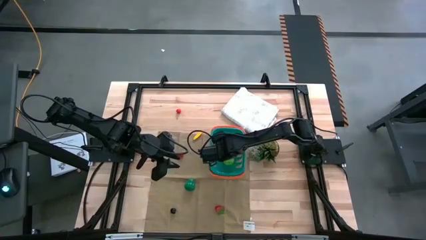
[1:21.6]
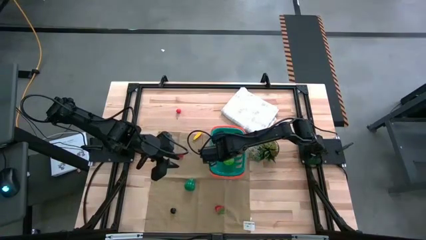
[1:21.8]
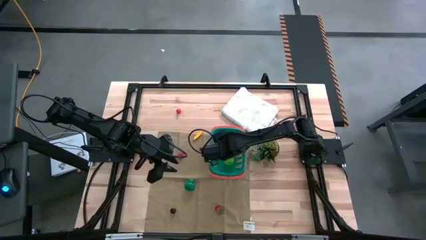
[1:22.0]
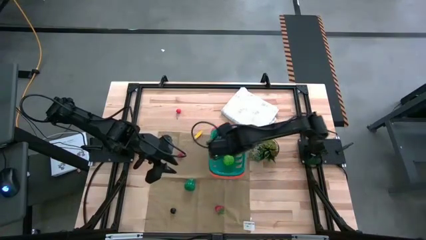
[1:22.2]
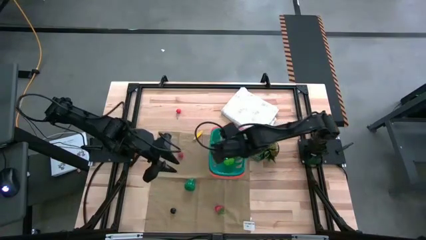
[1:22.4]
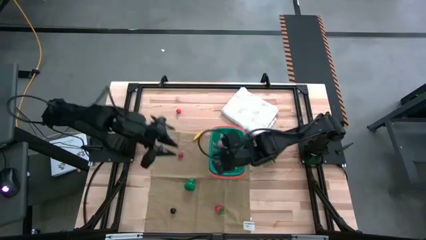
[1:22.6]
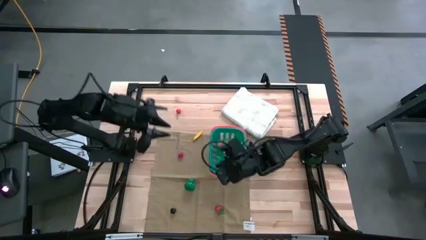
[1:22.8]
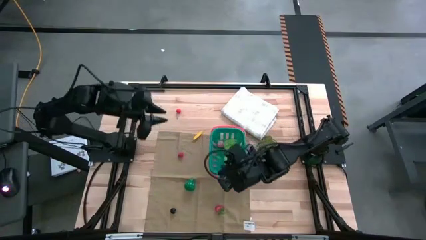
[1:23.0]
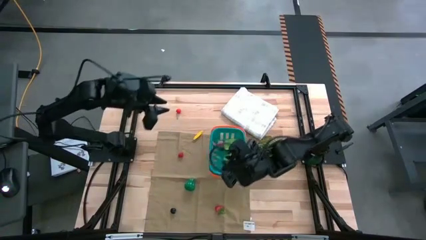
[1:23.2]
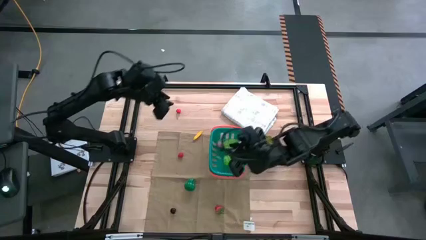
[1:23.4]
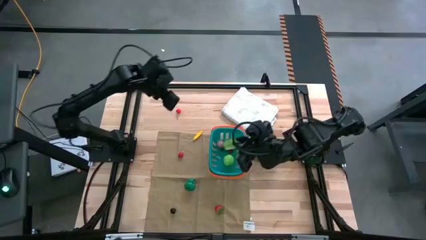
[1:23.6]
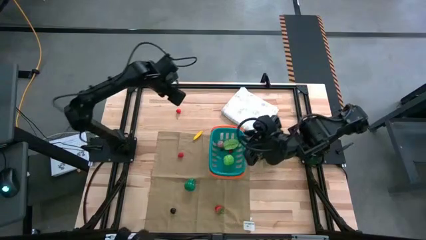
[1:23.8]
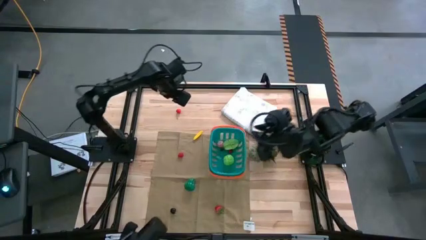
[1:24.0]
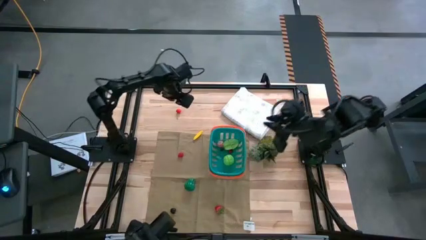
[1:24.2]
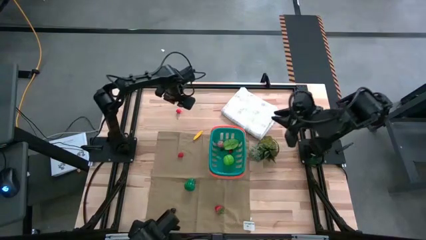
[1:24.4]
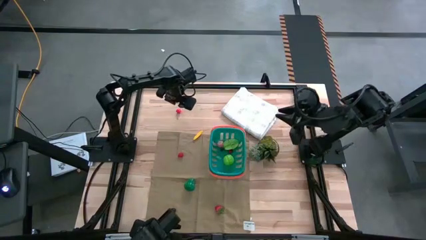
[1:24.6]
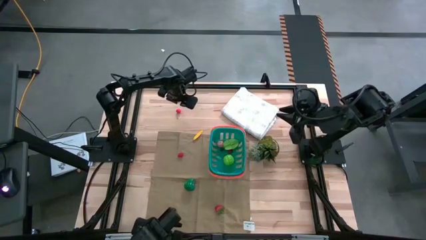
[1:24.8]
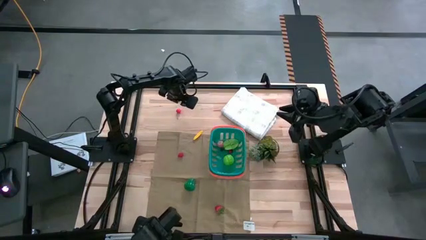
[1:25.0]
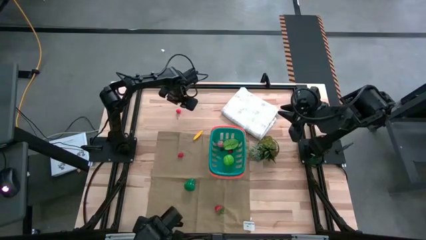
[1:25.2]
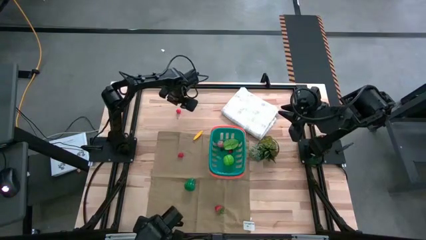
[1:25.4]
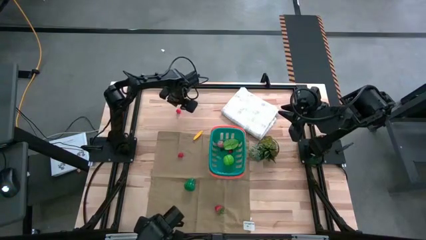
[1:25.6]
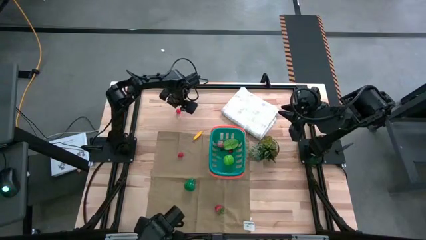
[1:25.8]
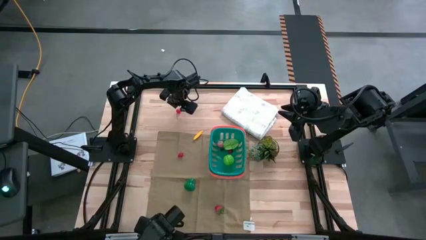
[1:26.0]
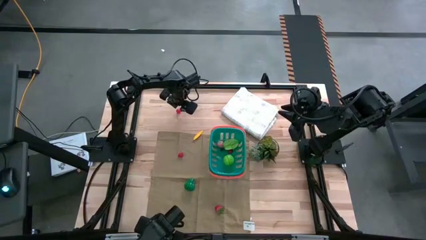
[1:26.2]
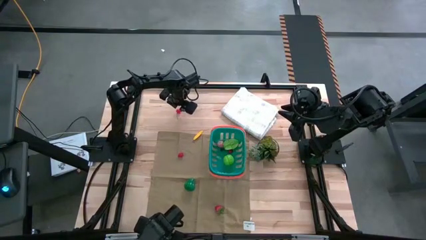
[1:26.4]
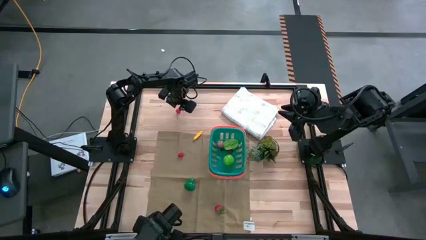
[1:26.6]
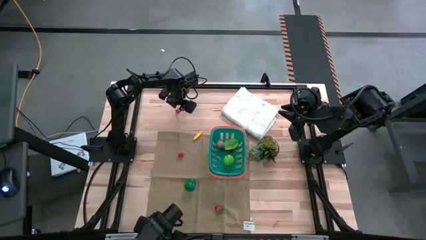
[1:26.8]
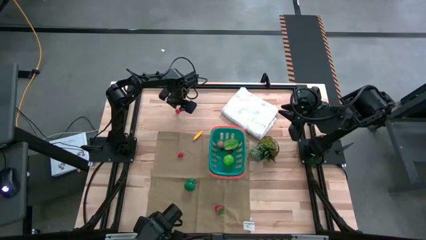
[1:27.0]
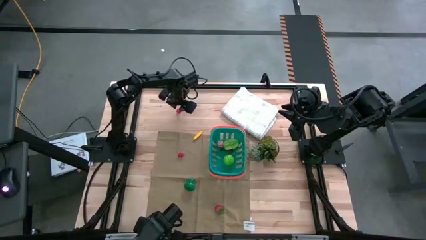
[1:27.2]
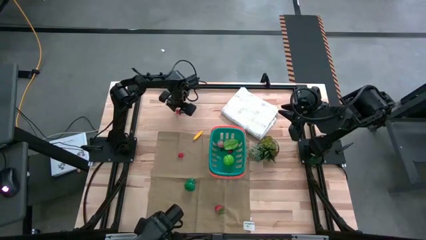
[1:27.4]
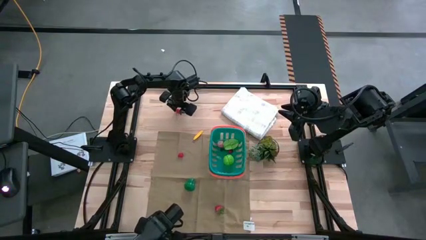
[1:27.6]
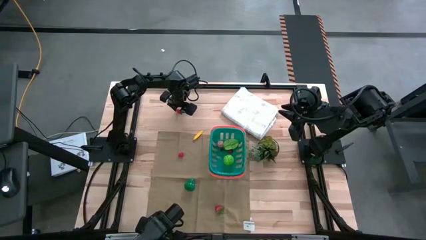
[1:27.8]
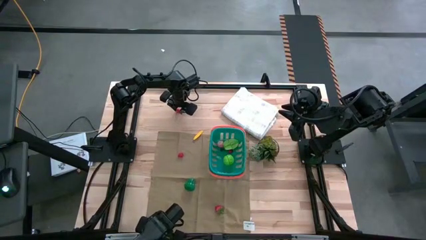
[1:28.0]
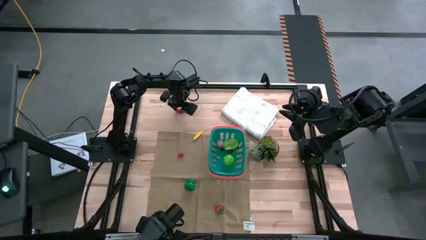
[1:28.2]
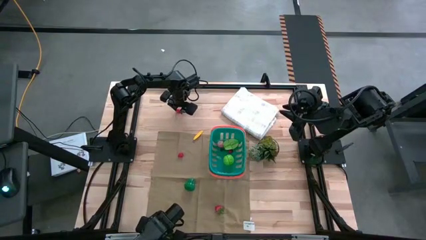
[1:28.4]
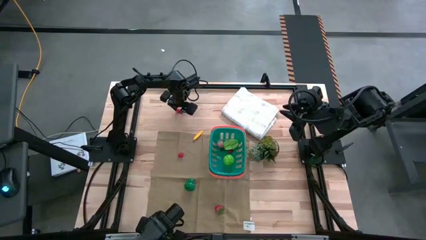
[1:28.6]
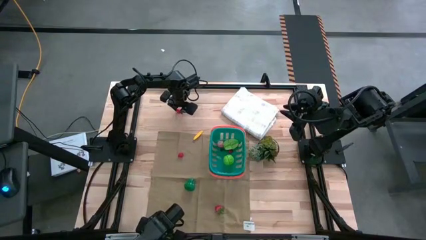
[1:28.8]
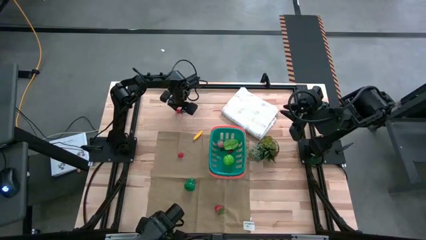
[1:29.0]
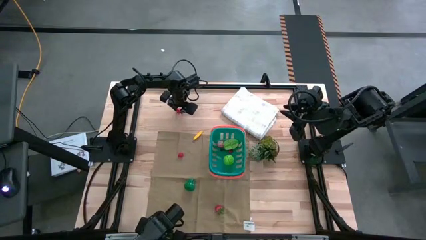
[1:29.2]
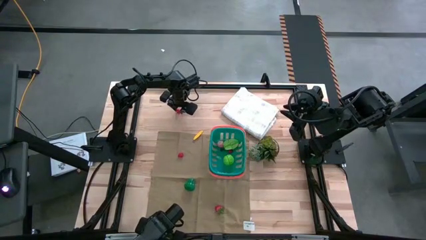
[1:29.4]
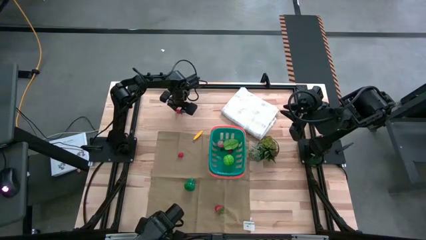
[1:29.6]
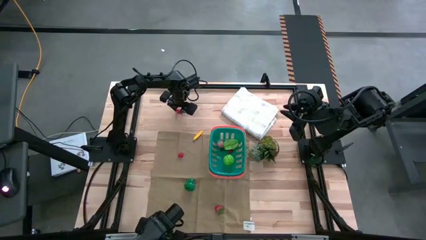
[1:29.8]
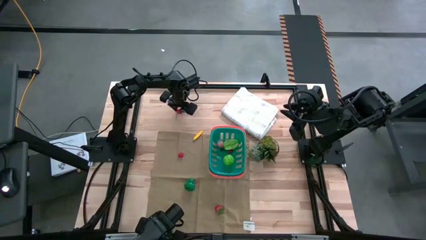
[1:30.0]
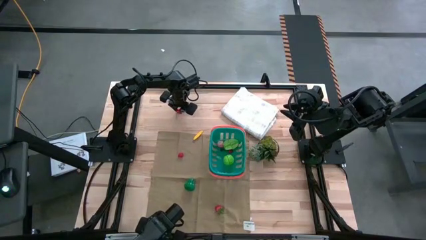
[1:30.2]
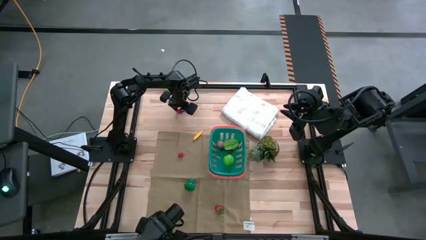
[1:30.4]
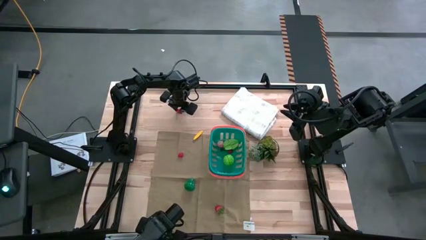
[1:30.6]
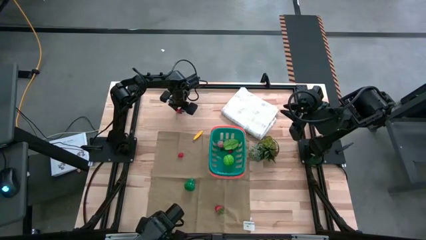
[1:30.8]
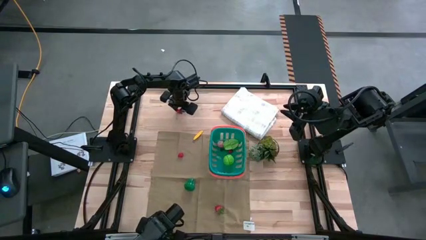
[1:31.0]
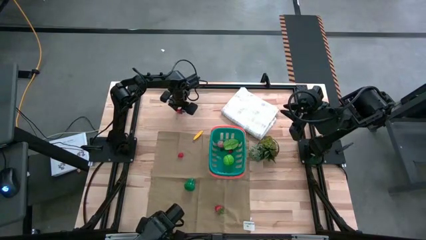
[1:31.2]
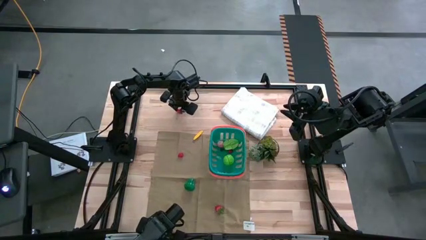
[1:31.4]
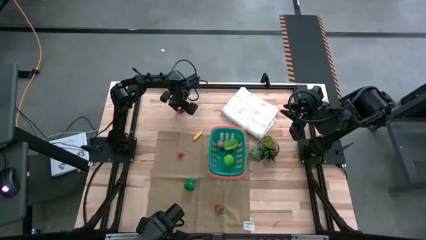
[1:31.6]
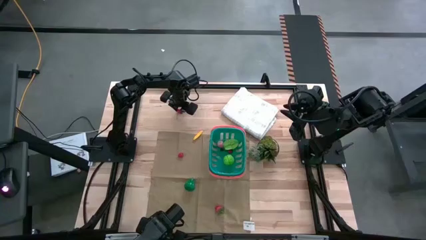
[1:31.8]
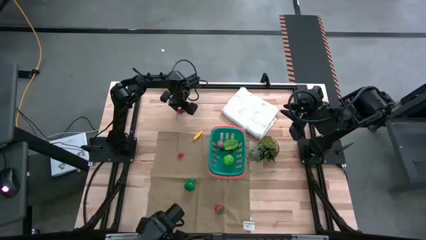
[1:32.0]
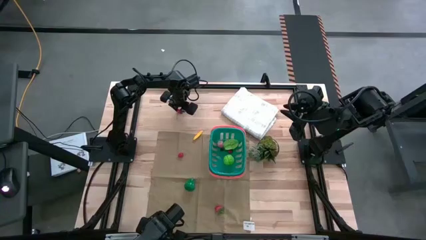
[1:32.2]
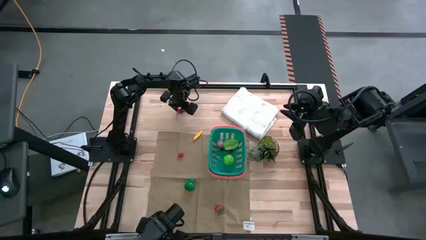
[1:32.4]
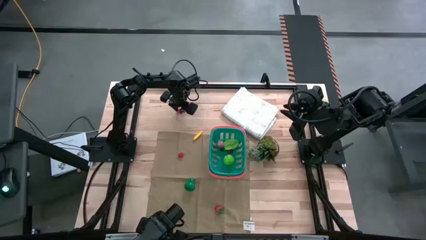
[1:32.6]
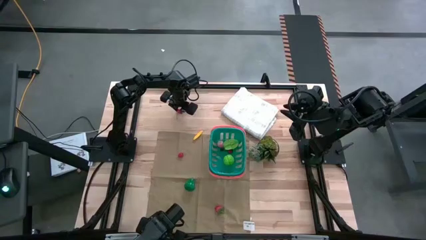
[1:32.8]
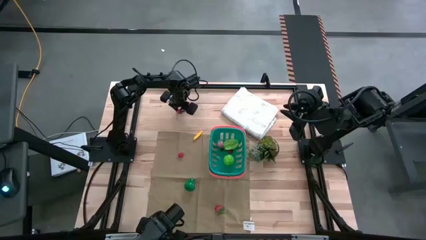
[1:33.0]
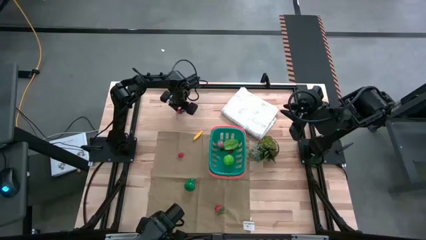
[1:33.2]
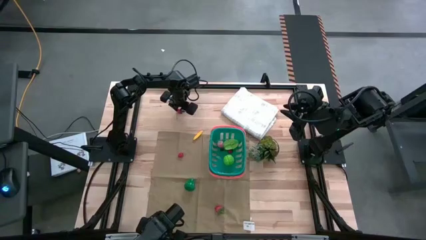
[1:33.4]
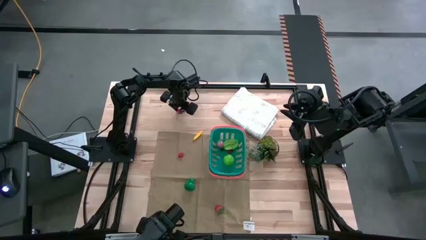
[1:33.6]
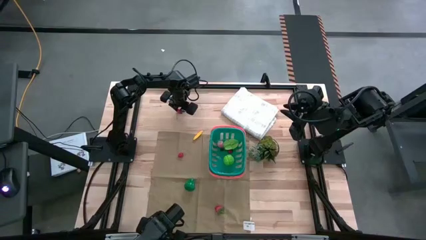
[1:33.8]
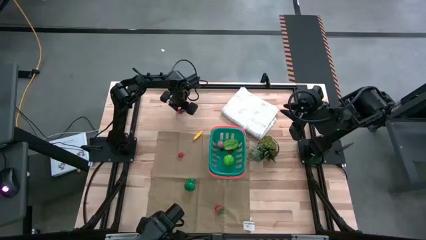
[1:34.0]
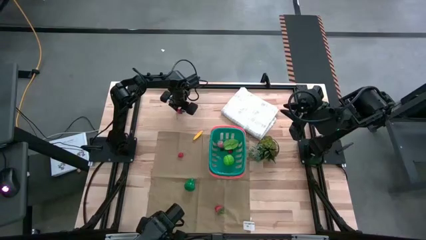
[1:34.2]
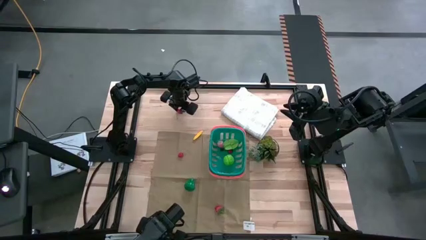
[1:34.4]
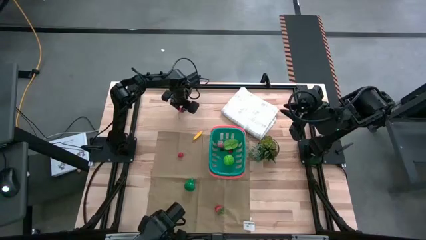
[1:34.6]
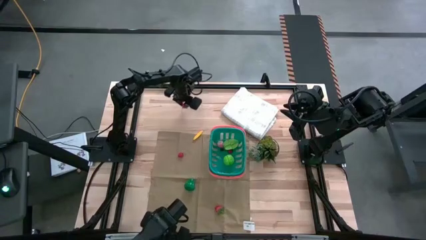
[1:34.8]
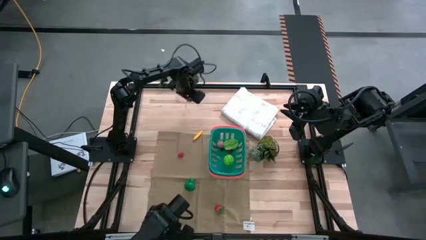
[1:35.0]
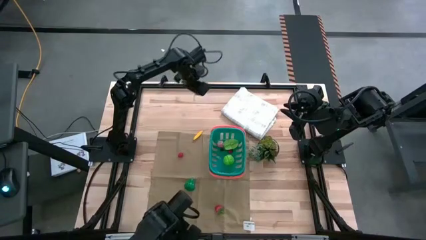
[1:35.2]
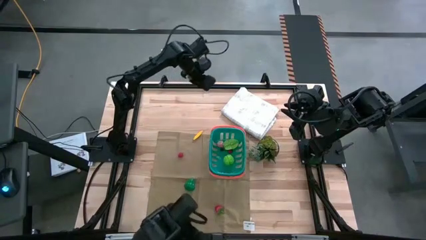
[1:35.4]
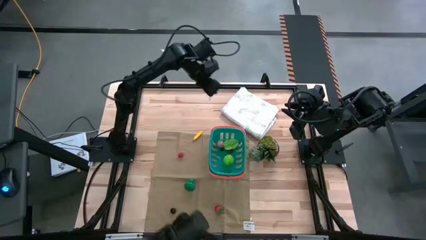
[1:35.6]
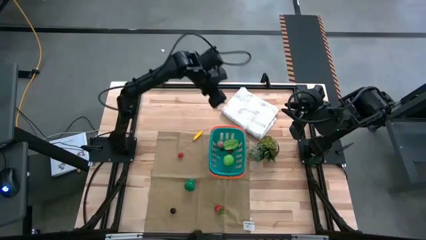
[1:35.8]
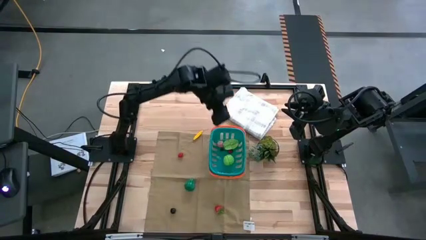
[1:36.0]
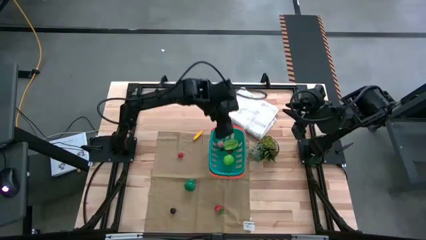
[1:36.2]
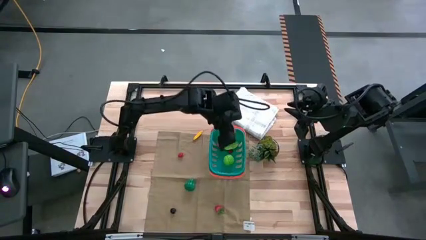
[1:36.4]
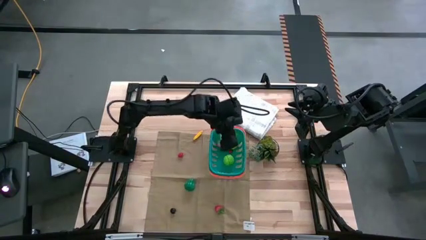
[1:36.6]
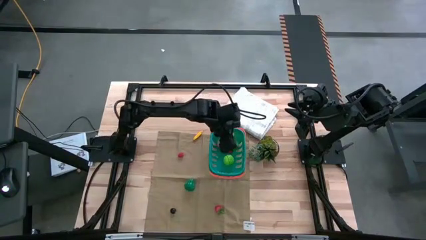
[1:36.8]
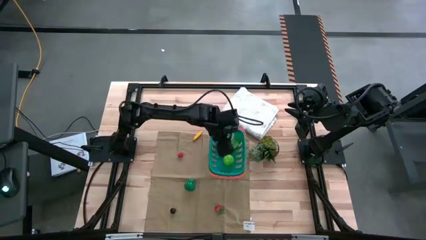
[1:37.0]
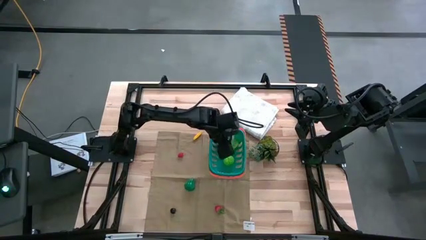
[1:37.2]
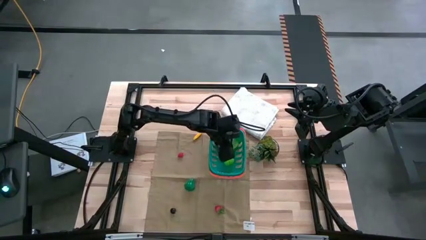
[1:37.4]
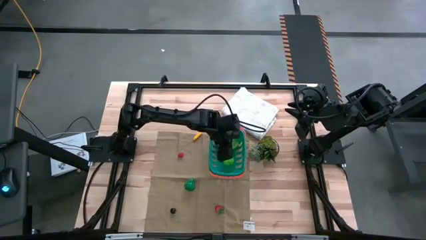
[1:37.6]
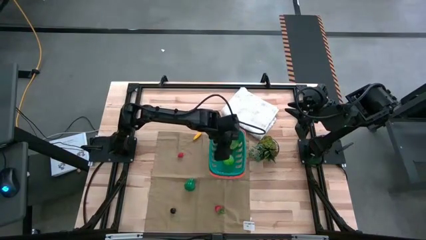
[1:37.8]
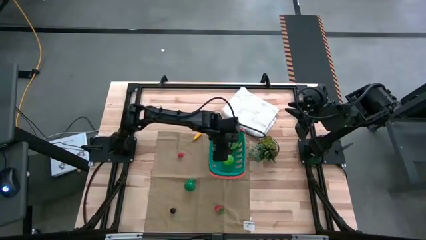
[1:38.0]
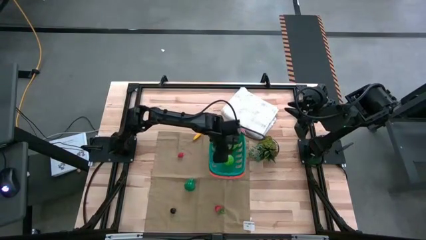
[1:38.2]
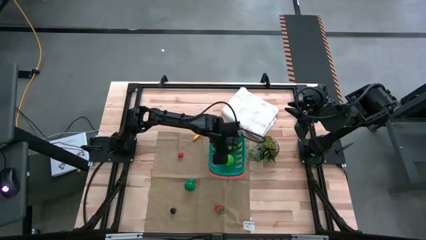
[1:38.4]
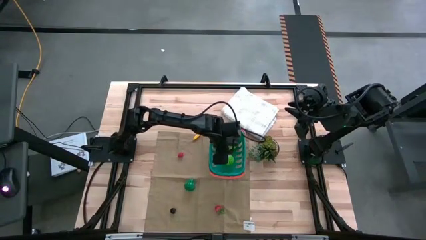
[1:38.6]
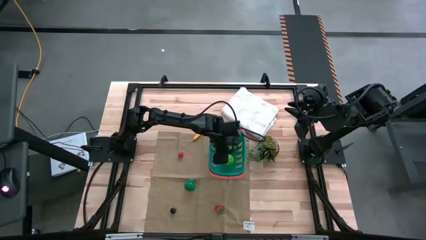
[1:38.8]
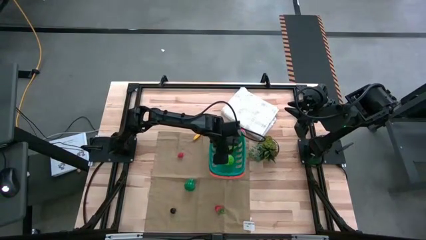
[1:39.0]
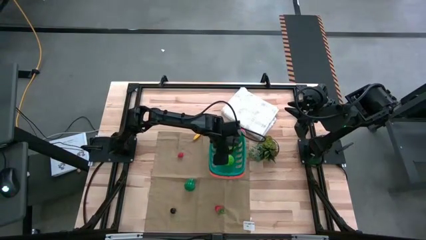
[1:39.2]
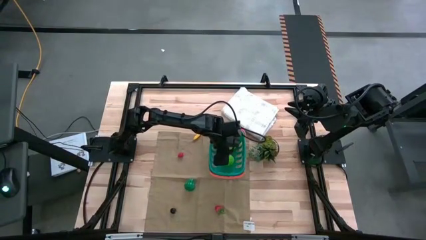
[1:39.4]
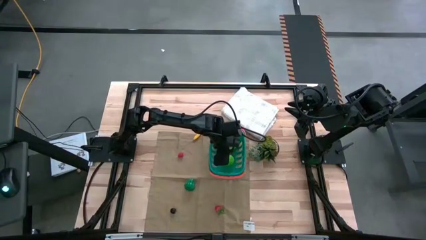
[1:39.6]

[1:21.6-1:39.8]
Task: Pick and placing Produce into tupperware
Put the red cherry into the blue basket
